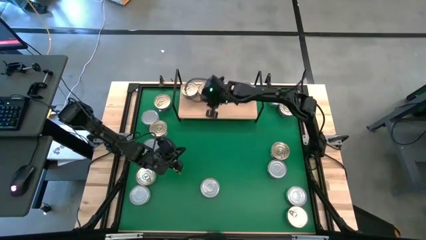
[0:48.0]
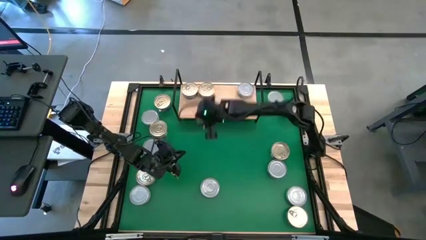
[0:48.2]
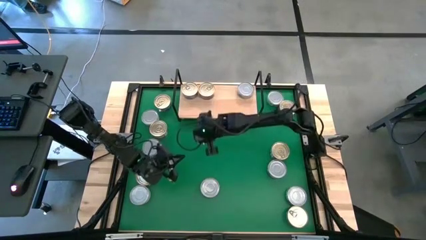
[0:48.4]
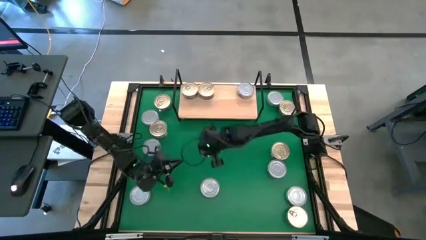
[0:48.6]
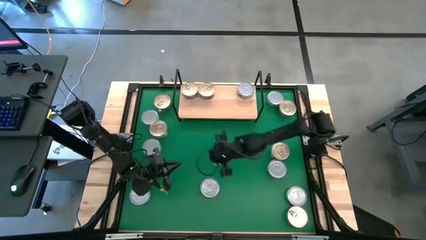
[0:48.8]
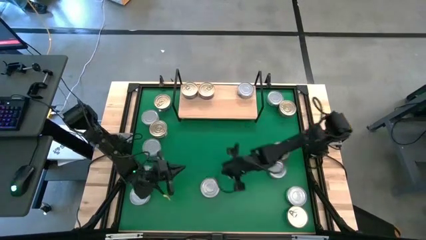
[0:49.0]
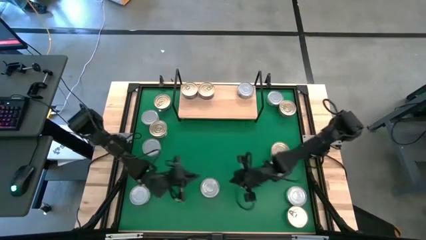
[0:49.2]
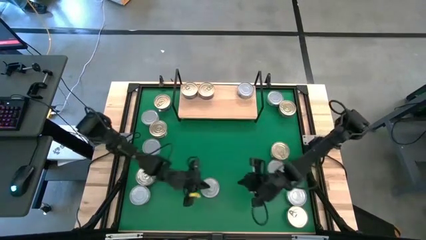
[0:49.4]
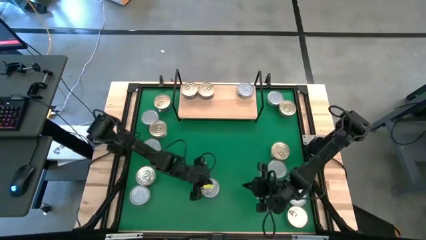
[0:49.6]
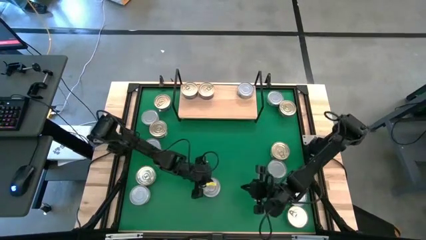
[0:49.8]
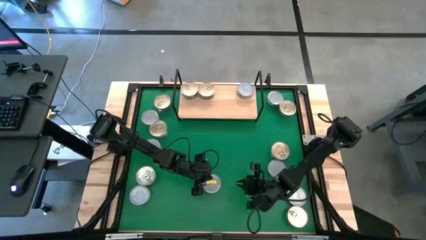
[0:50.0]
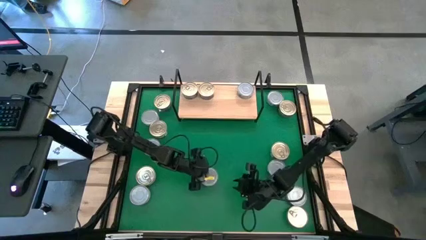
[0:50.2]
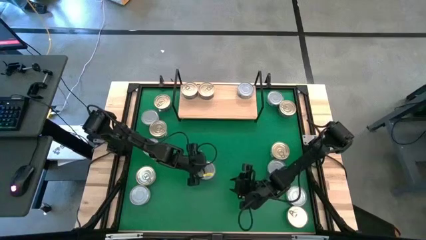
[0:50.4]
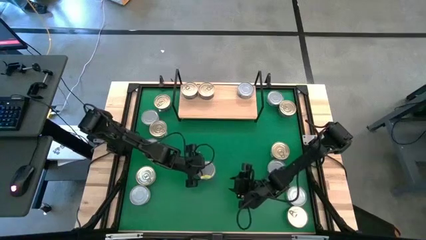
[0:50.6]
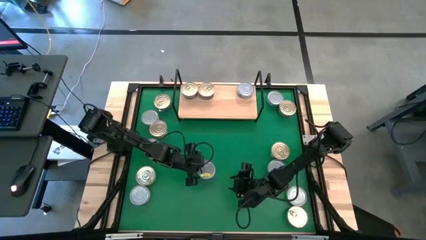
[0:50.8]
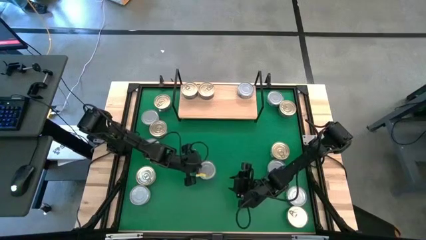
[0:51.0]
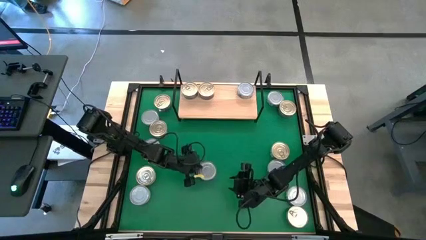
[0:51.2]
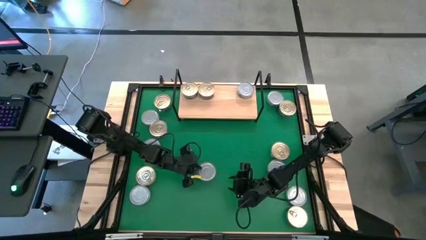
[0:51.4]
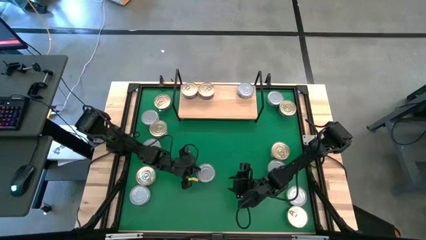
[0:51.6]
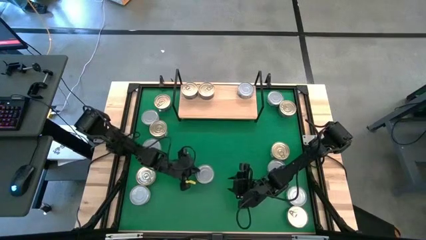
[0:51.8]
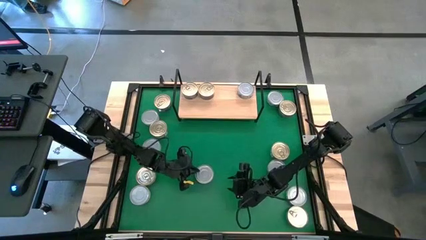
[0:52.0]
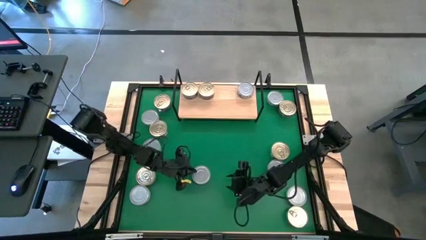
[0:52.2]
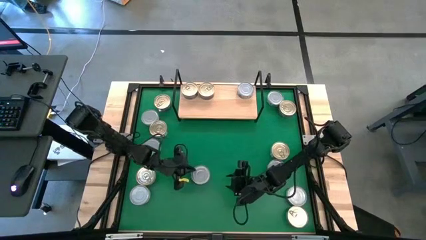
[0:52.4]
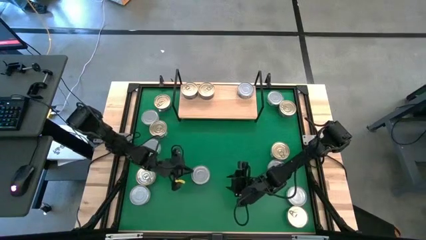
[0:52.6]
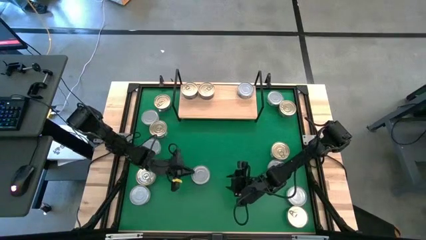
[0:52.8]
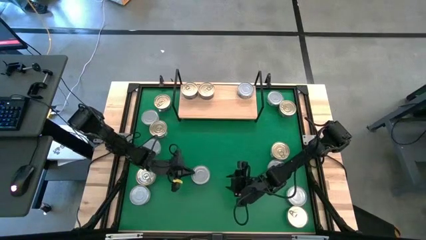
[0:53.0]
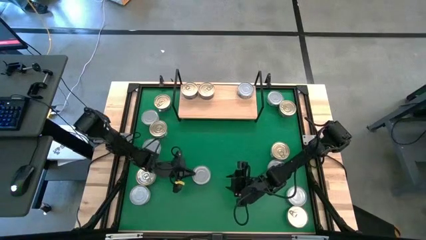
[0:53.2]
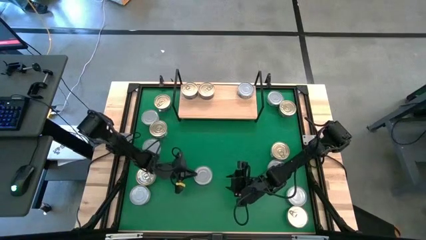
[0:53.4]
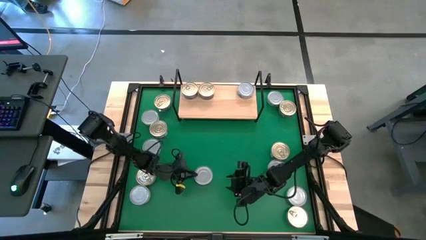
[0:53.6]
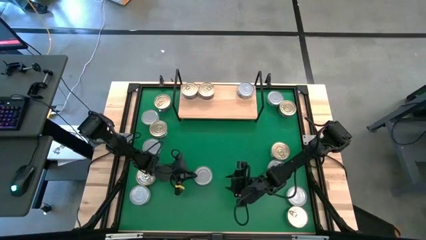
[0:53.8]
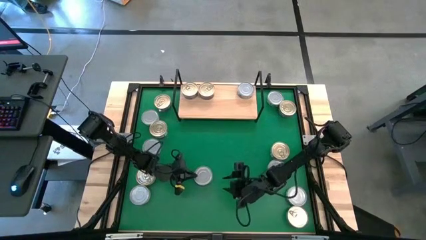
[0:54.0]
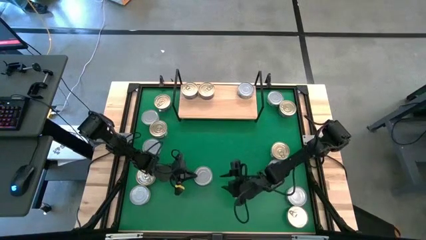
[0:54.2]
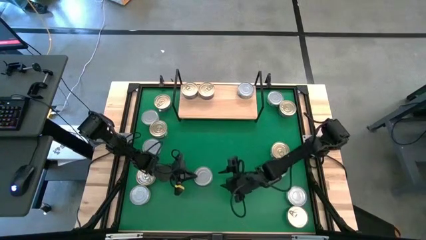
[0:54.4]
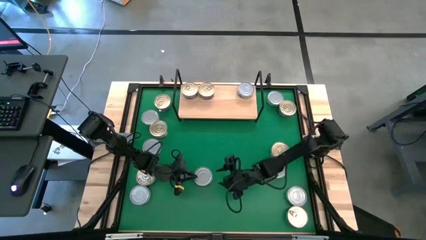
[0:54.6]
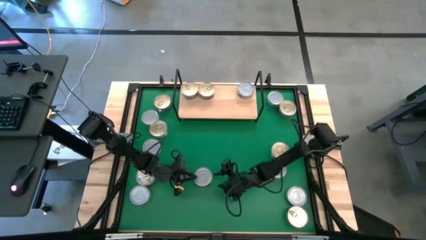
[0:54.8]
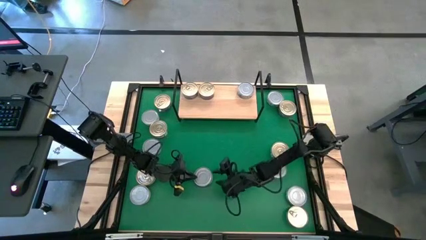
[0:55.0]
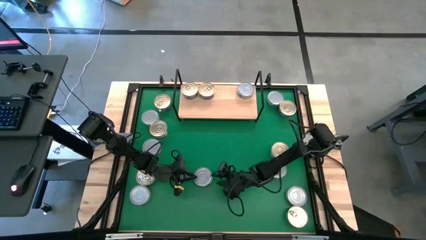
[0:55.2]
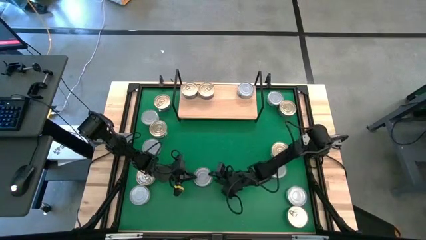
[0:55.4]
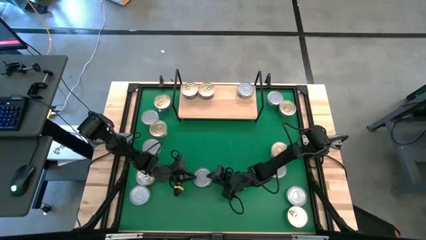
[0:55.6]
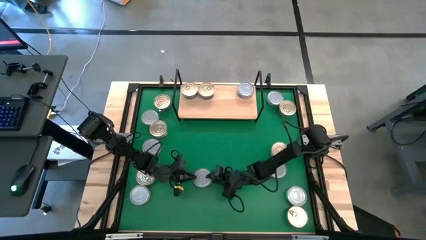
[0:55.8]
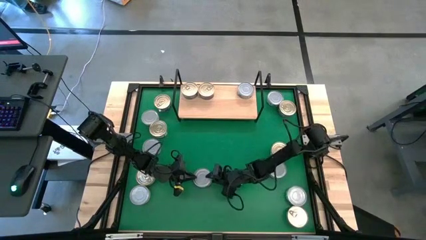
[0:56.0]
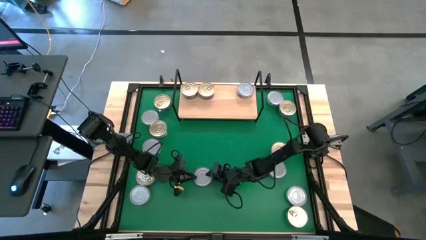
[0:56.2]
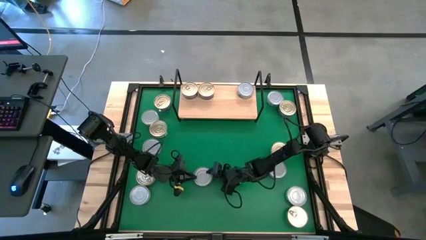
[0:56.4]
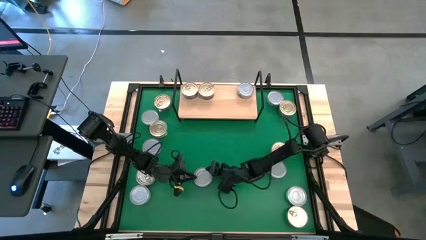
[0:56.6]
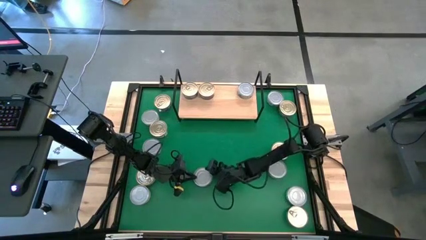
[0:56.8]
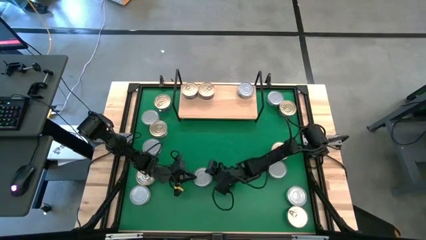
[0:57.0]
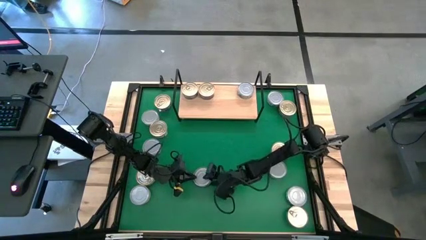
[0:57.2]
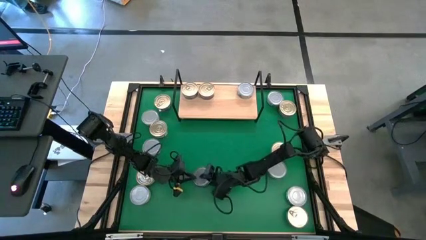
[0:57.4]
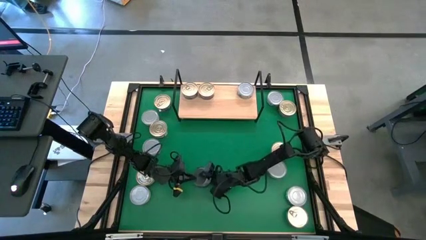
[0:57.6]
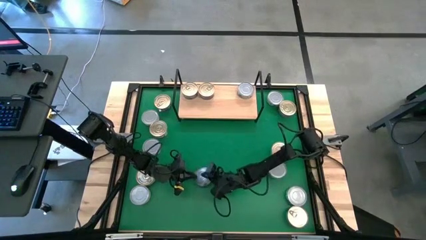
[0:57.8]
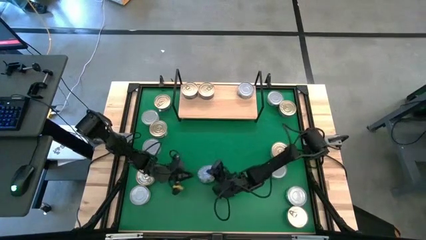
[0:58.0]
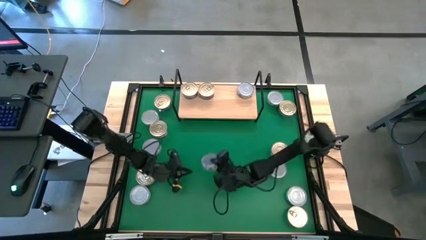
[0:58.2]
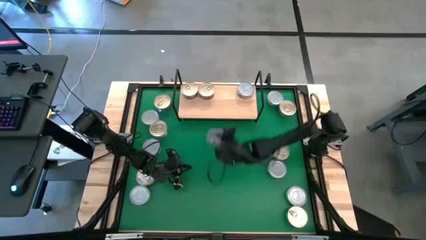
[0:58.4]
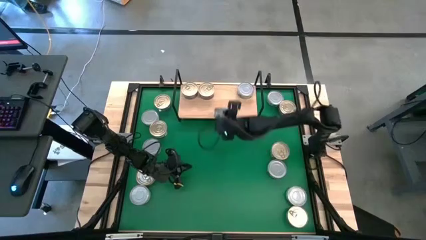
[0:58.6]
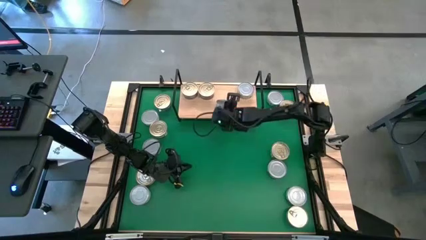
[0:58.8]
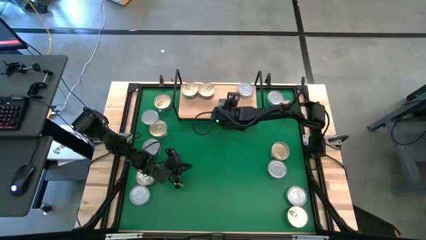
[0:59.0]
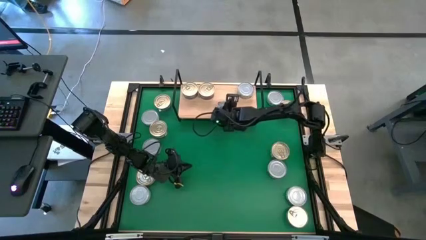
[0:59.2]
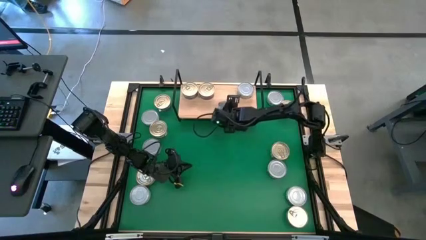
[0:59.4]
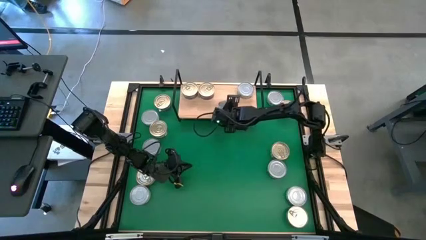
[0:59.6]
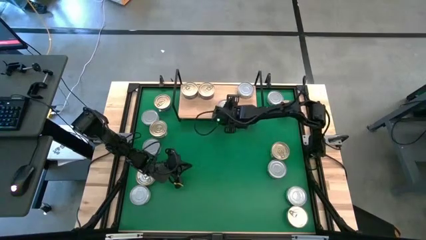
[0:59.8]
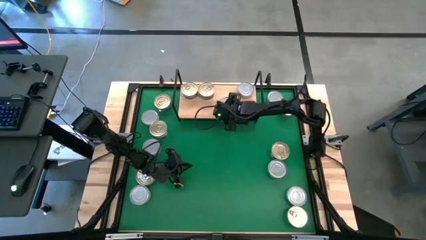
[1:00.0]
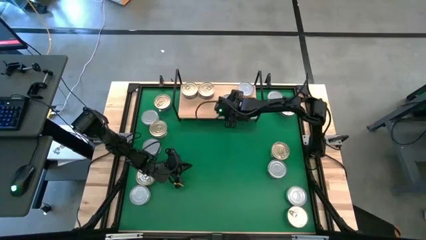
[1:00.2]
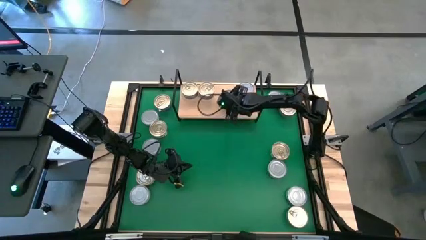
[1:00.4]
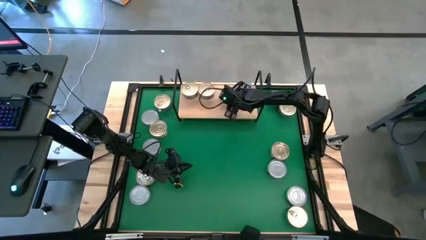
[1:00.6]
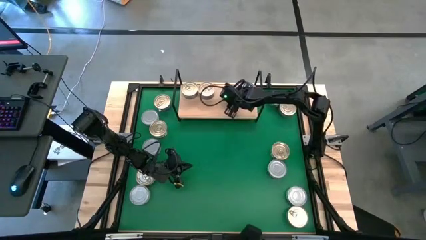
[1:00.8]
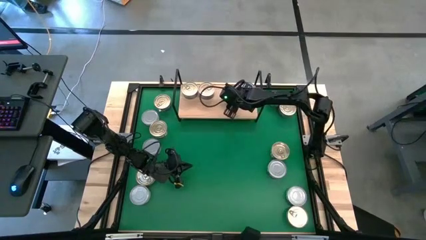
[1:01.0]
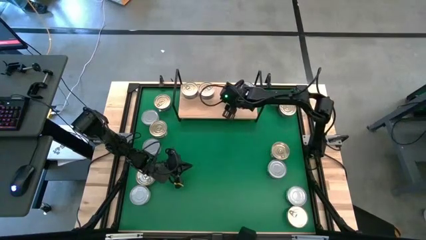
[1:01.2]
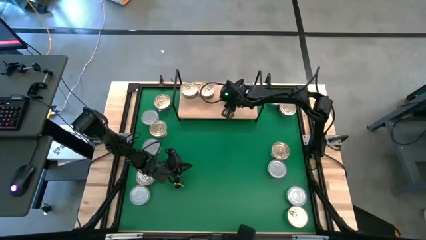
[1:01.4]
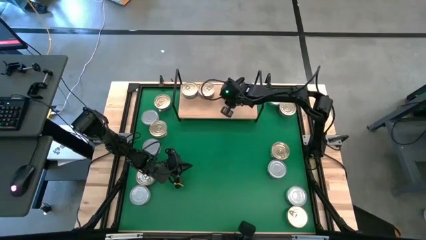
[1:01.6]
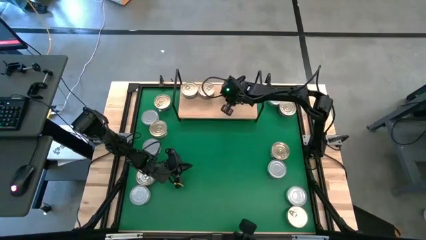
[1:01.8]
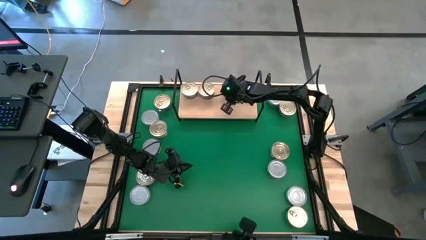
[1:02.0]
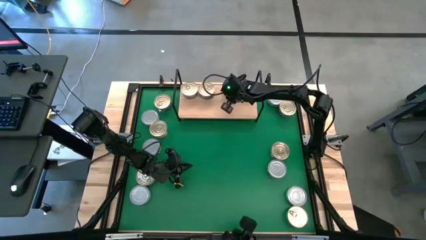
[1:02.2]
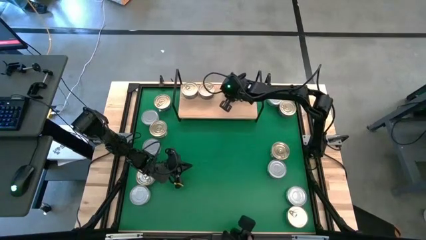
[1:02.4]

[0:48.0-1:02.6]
Task: Stack canned seafood by type on shelf
Put the green white tuna can on the shelf

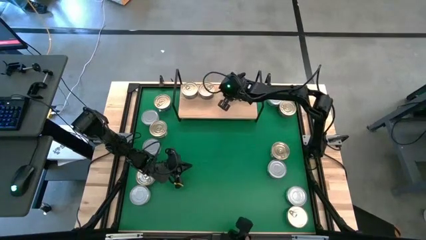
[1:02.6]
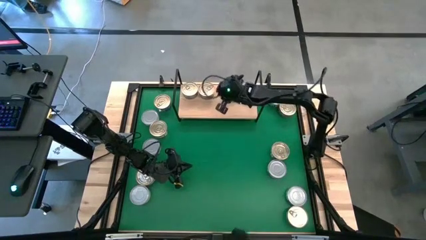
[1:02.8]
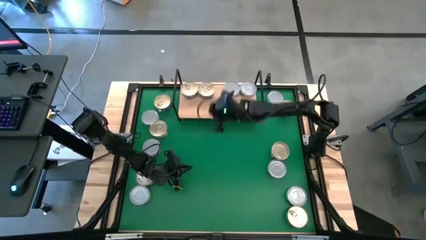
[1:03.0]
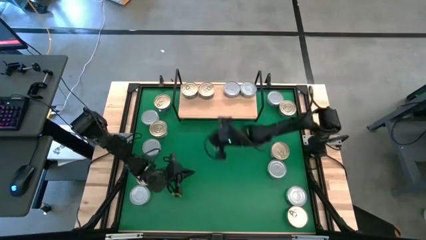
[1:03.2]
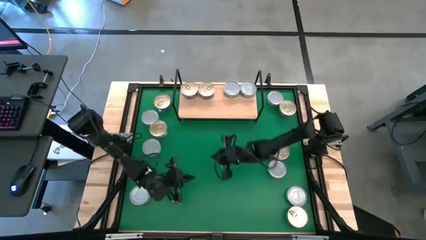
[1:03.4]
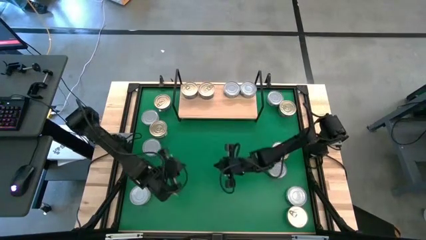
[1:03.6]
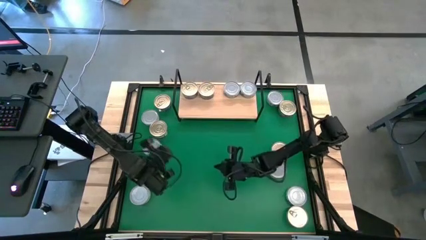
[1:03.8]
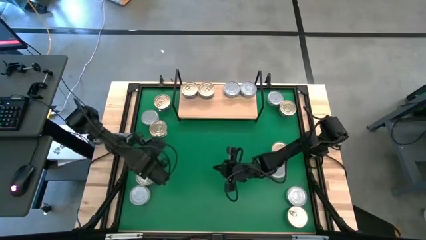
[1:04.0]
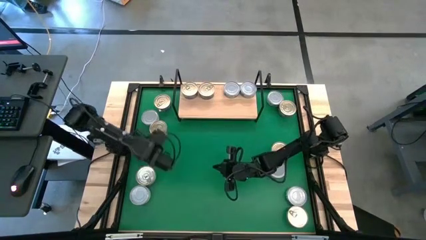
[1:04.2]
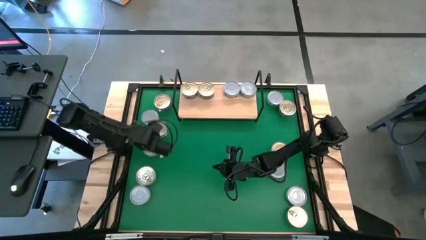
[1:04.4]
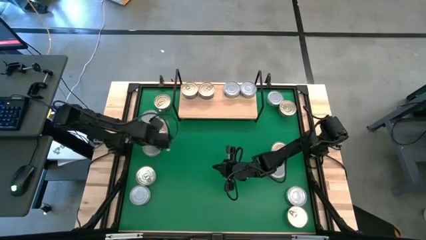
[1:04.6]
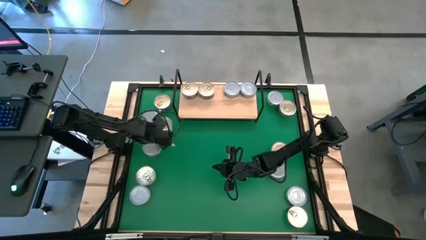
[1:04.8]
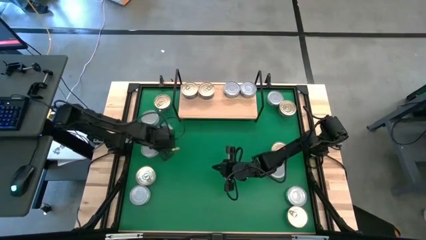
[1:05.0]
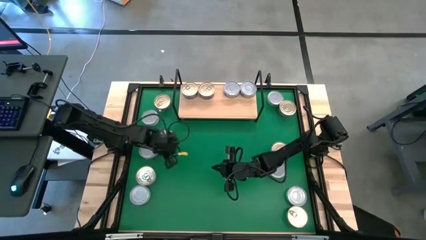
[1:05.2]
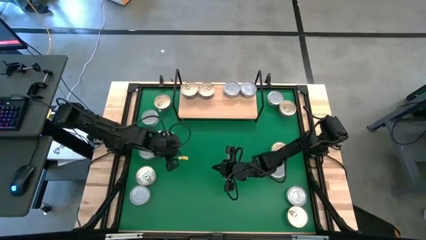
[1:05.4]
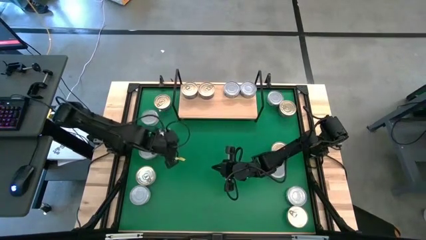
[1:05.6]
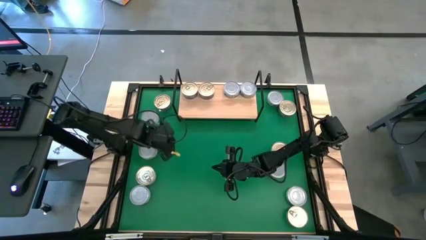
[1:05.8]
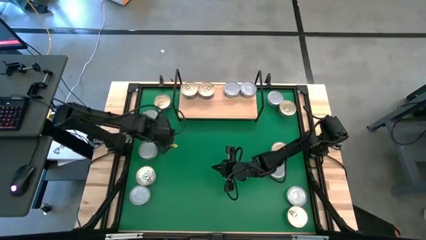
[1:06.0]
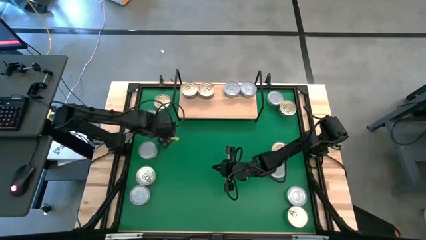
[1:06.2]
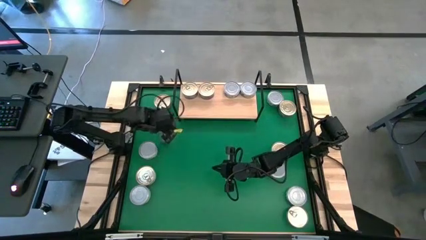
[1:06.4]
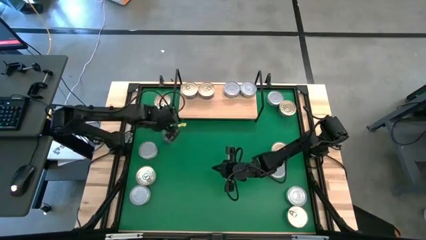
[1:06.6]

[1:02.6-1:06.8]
Put the blue pink tuna can on the shelf
